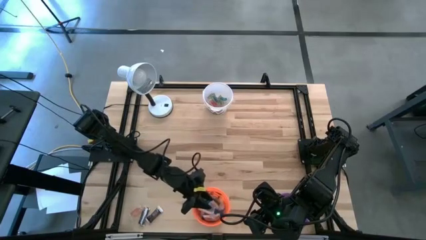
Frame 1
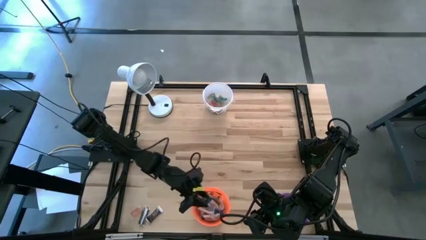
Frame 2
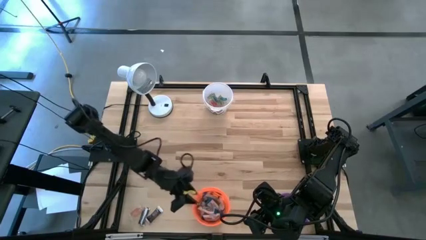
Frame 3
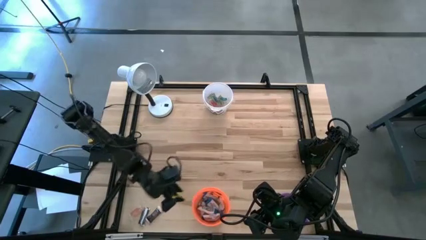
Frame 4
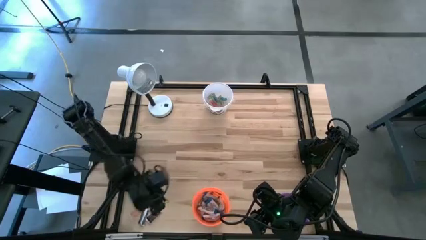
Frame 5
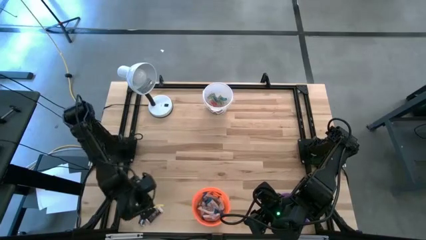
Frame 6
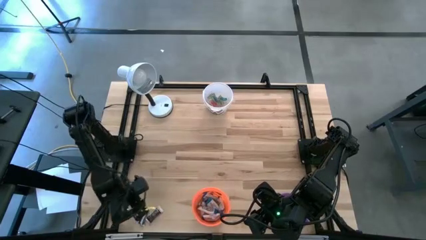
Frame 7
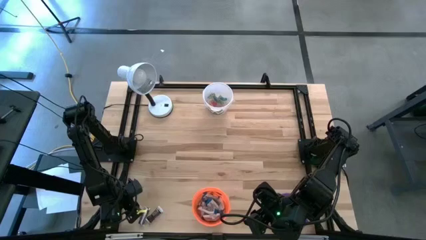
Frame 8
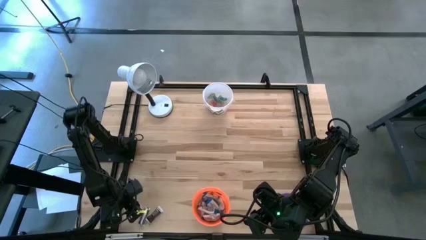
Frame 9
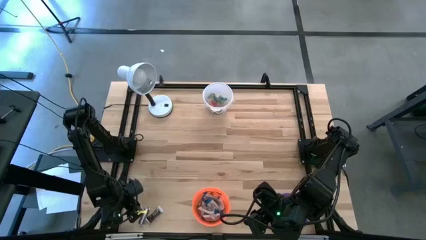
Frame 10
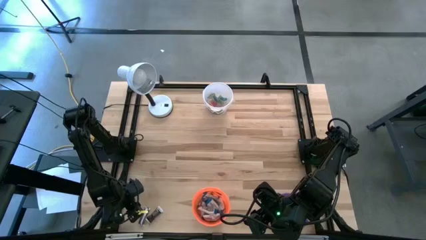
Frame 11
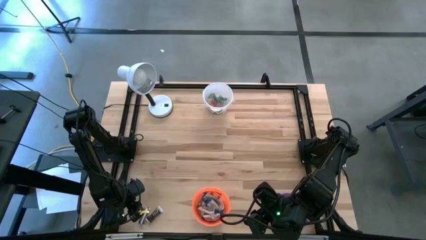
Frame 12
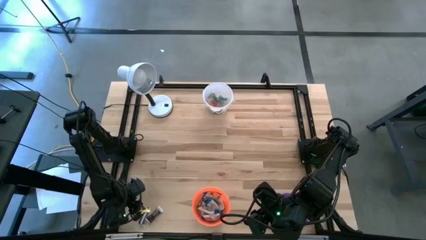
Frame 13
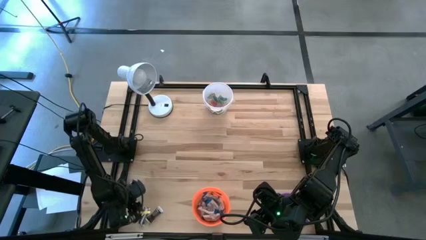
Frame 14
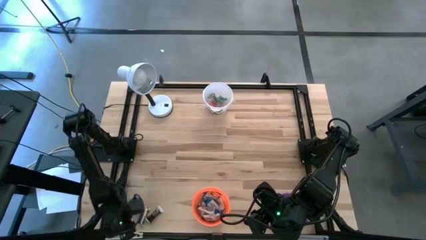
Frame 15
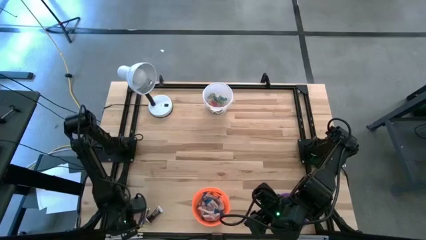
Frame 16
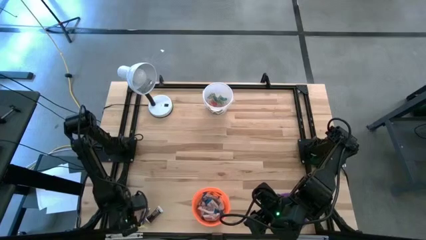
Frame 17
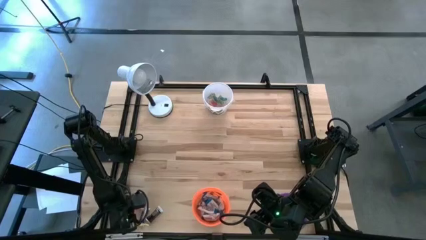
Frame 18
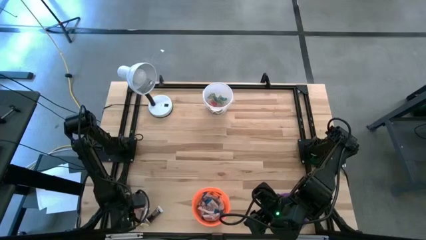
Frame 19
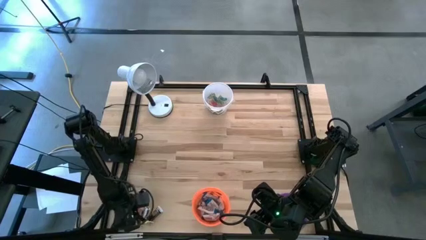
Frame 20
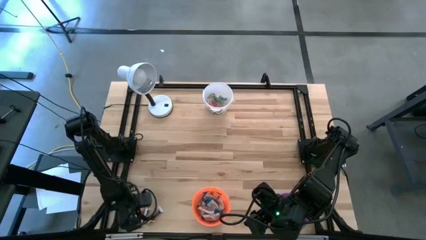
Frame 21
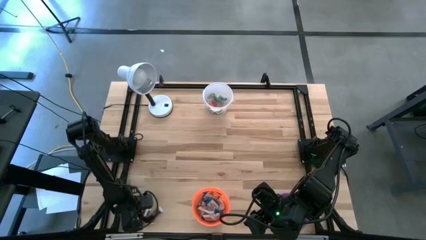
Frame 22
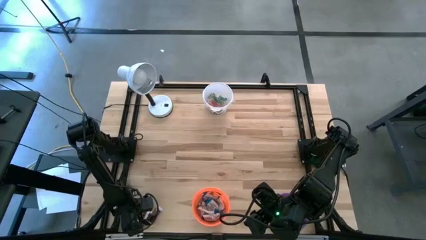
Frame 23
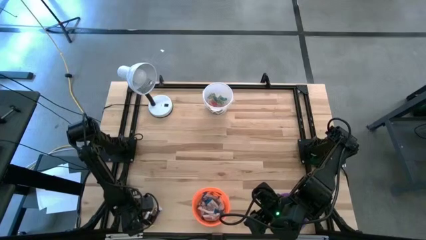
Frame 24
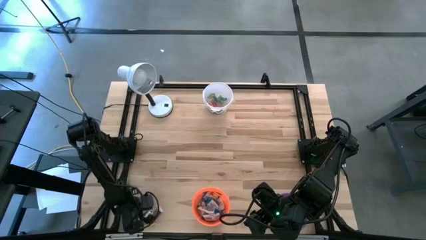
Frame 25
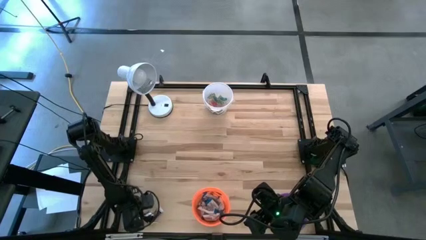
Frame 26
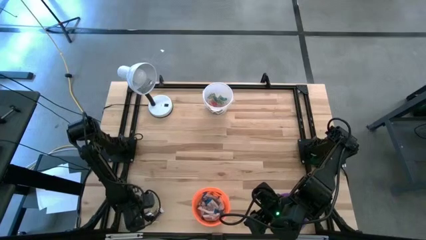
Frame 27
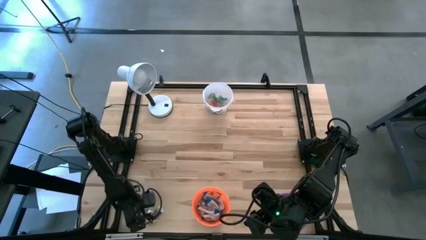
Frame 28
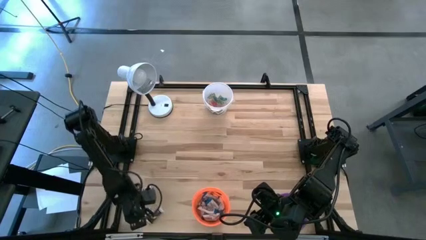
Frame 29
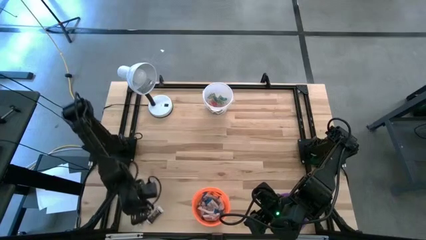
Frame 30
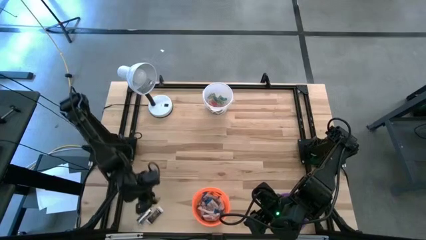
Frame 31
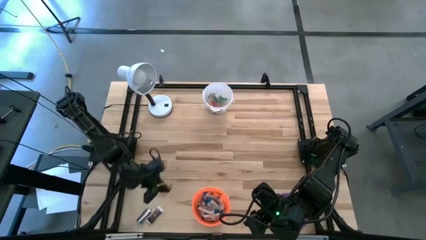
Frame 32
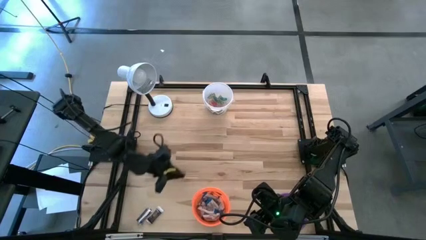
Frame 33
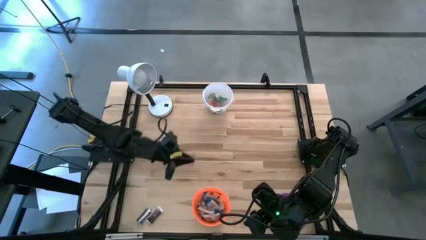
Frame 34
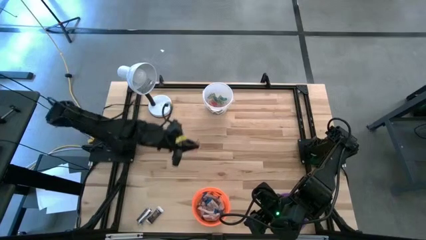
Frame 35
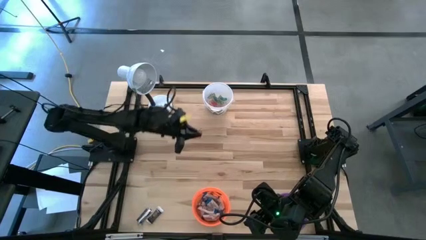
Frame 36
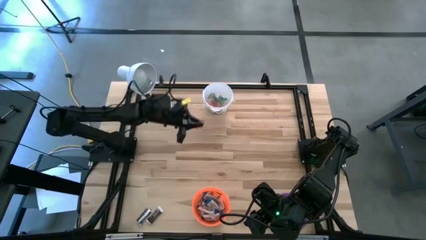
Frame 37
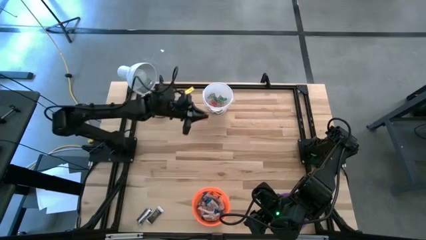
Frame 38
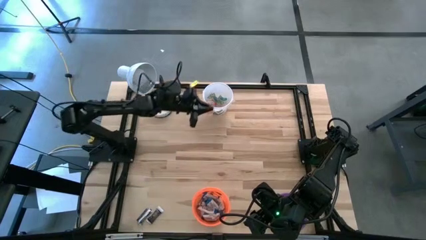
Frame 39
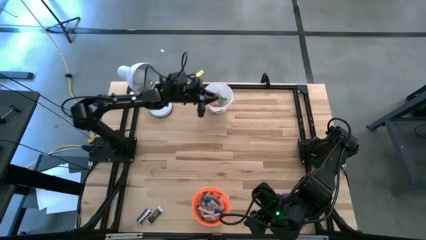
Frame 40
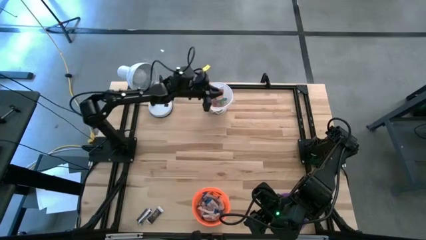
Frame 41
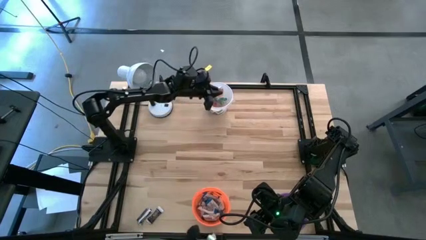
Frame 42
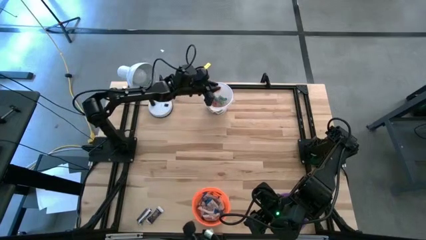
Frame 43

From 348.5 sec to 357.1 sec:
Task: Organize candy in baskets
Put the orange gummy into the white bucket

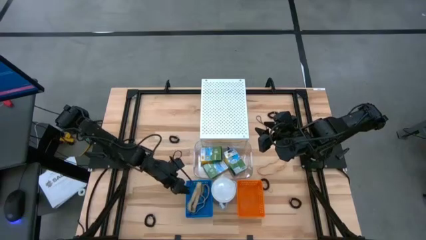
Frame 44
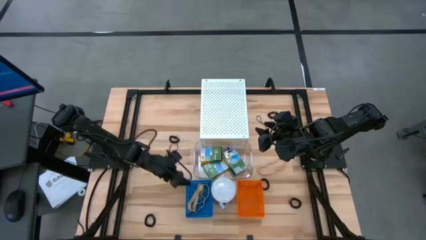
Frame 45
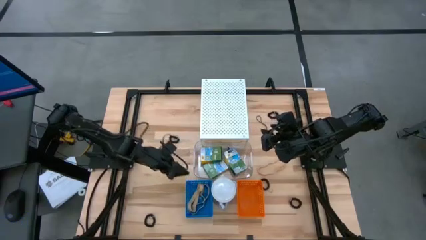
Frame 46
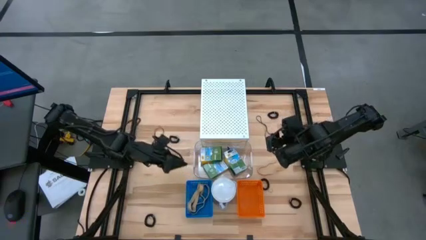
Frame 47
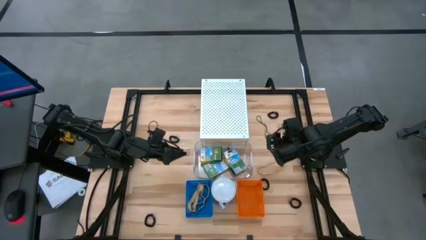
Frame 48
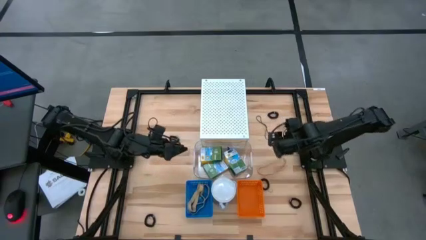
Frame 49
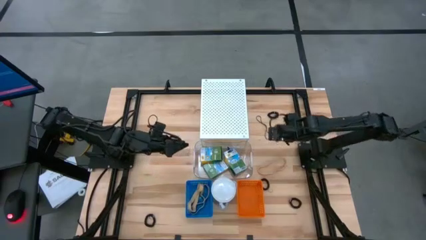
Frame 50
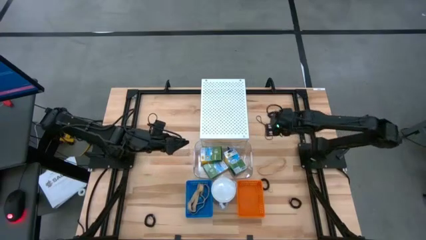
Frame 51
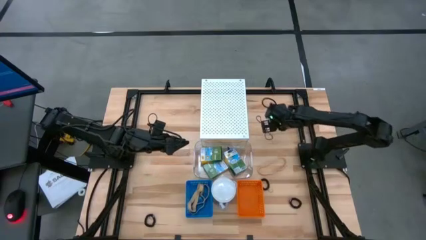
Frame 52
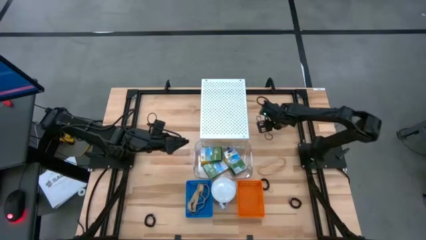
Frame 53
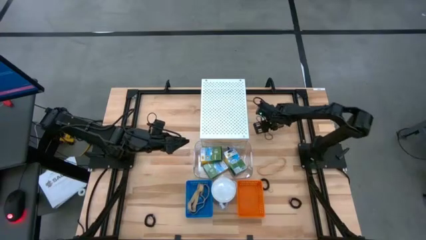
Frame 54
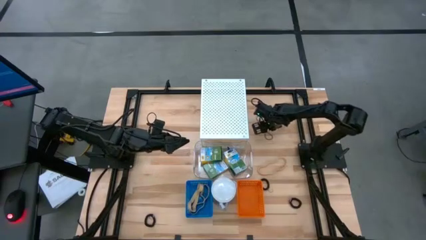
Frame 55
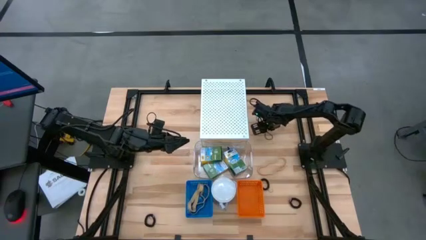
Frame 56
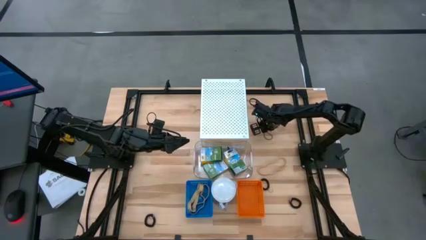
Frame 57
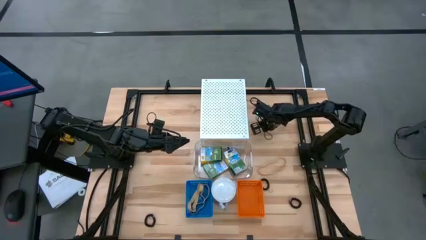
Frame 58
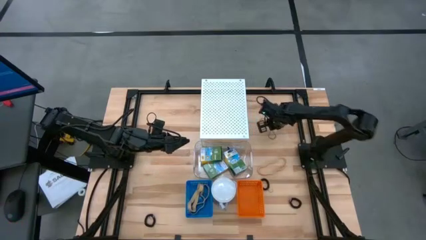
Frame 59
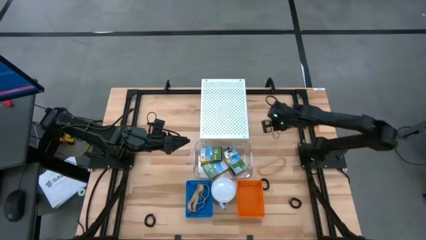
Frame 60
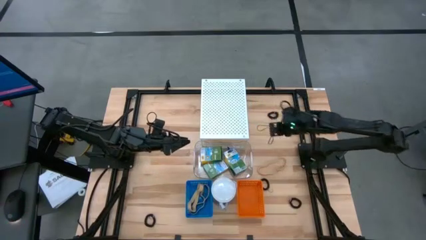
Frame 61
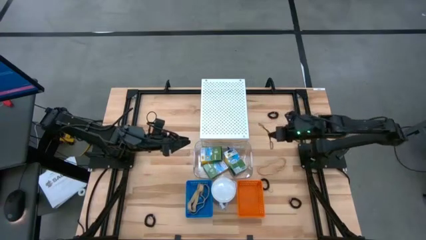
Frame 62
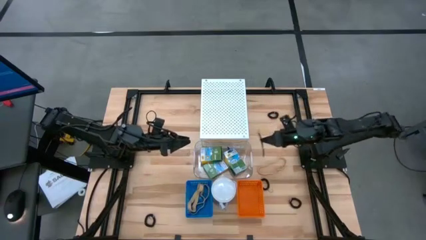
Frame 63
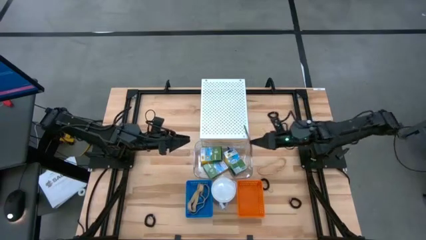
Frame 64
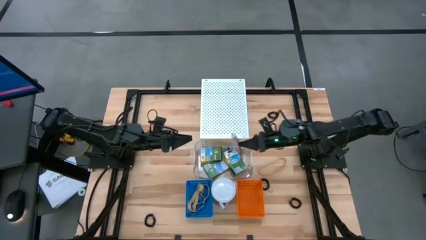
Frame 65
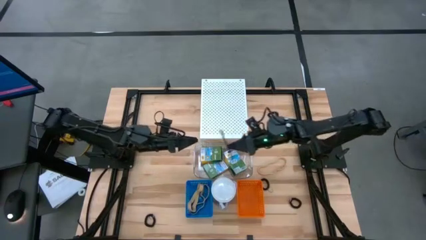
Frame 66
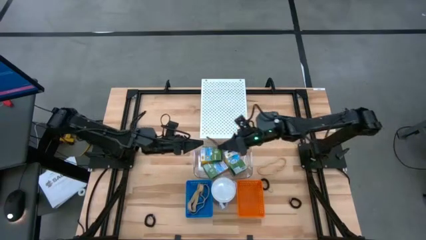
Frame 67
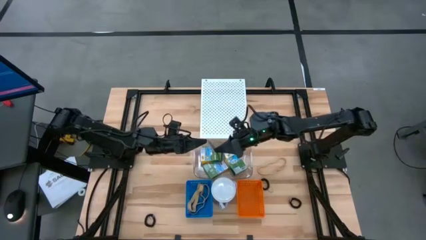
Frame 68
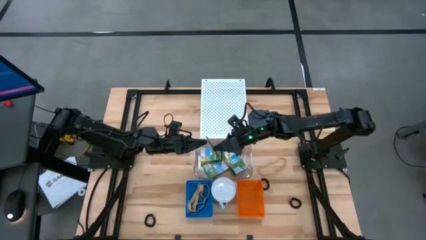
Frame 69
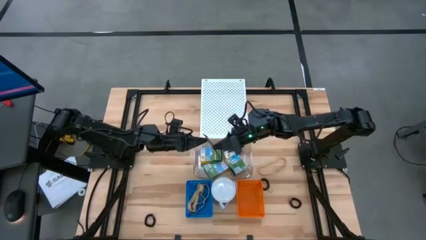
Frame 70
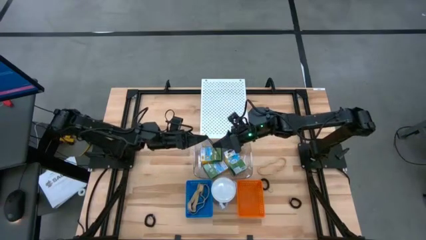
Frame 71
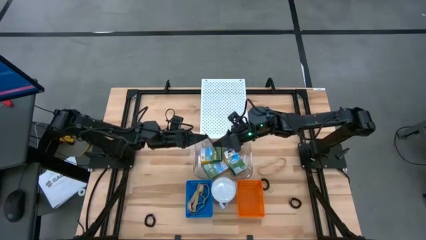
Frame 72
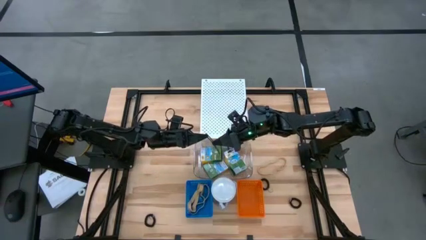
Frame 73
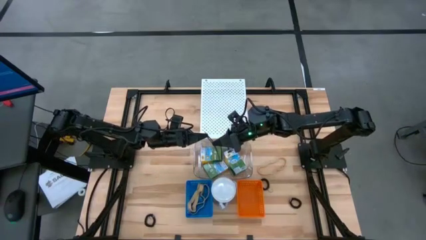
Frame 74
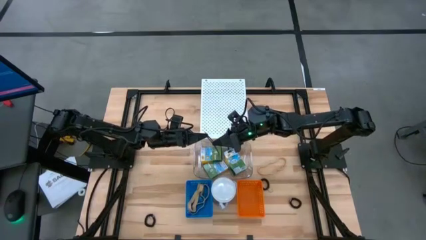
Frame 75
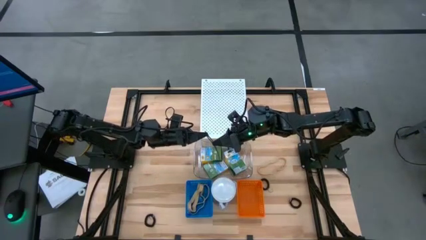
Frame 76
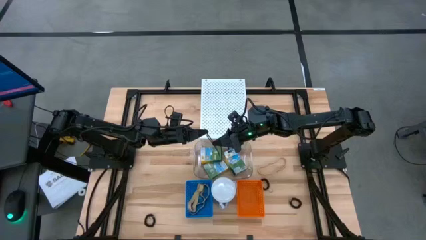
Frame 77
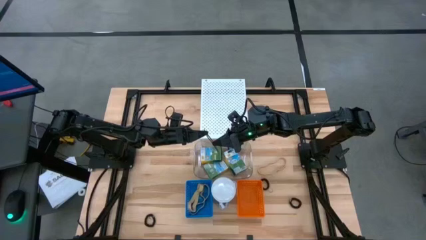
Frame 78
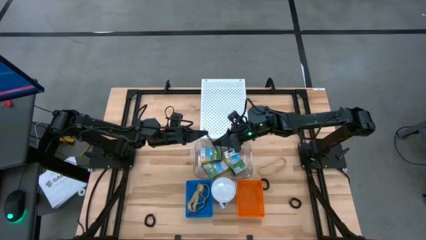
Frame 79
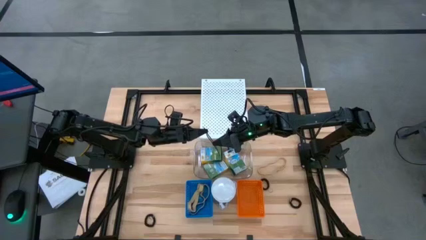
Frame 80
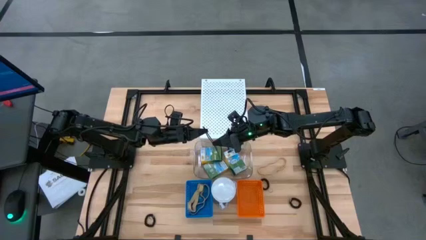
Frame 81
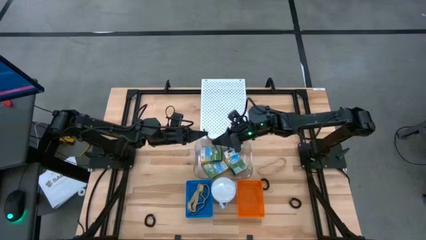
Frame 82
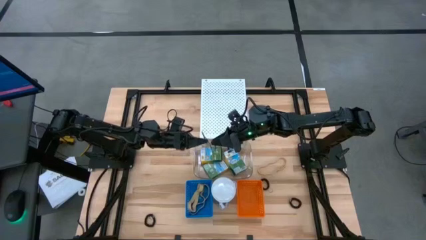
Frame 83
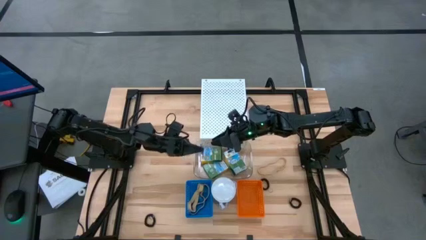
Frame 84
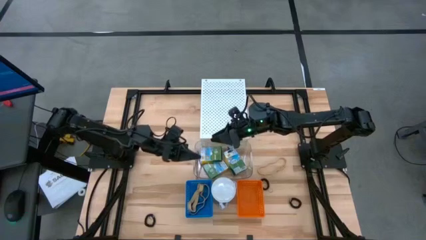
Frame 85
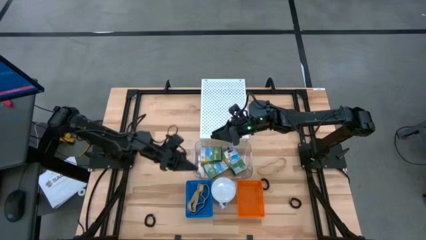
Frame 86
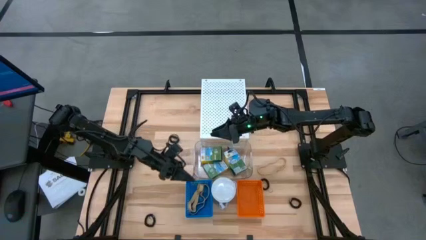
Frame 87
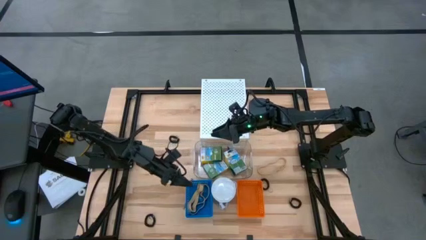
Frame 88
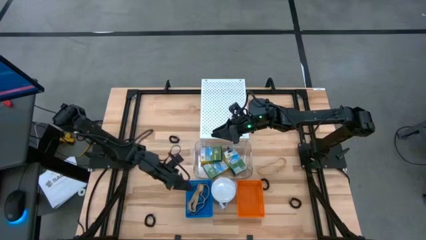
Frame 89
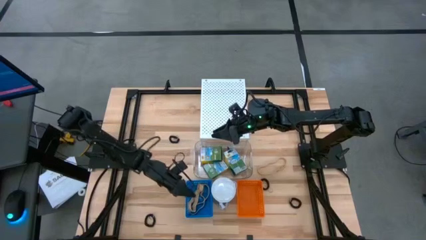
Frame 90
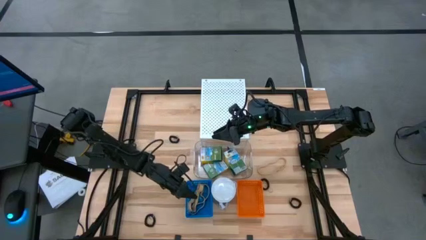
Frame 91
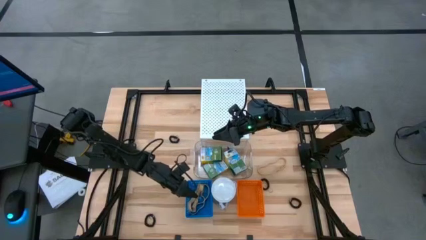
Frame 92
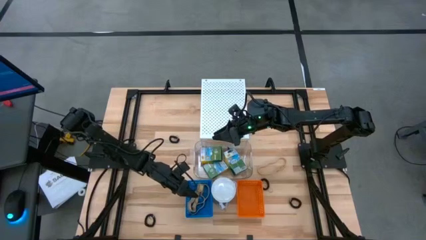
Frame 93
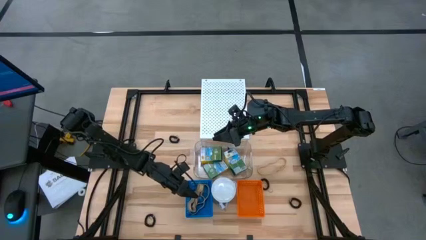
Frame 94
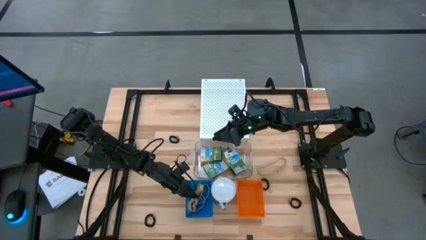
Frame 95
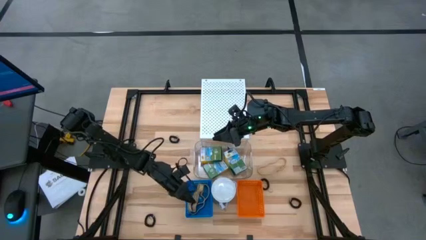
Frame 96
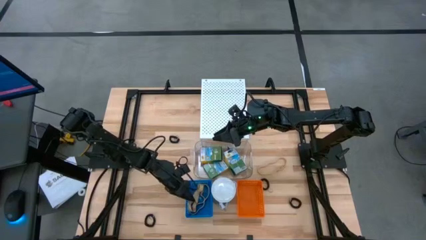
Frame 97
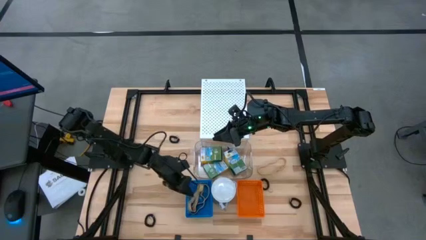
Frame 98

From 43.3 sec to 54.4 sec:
Task: Pick & Place Office Desk Supplies
Put the black rubberband into the blue bin
